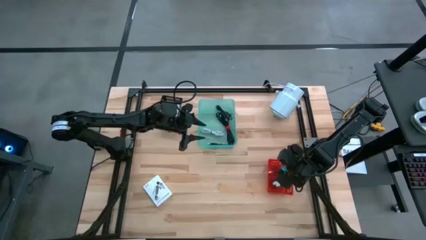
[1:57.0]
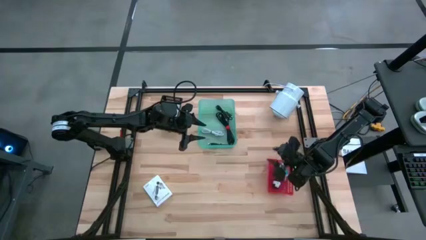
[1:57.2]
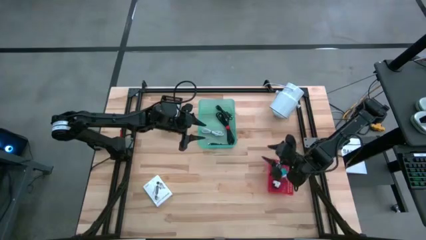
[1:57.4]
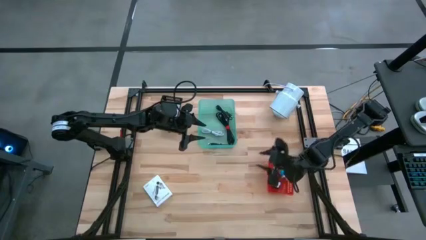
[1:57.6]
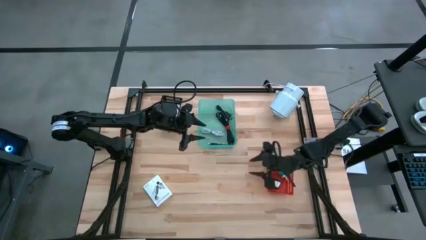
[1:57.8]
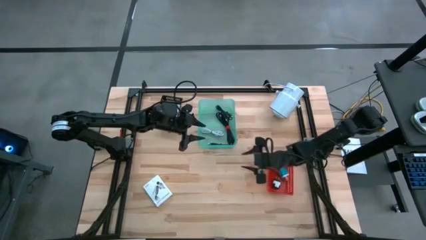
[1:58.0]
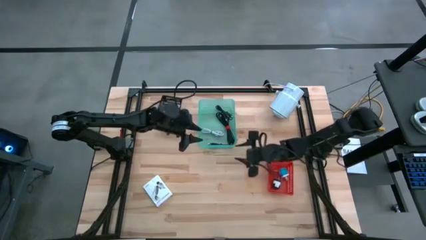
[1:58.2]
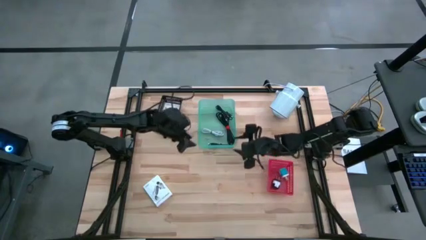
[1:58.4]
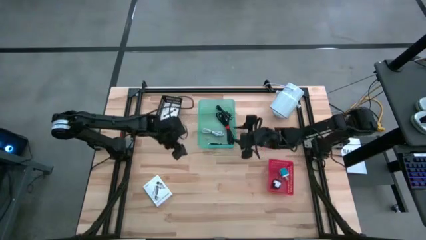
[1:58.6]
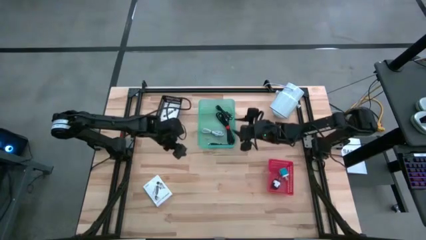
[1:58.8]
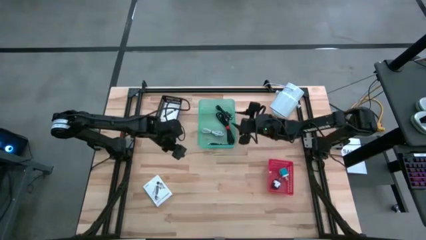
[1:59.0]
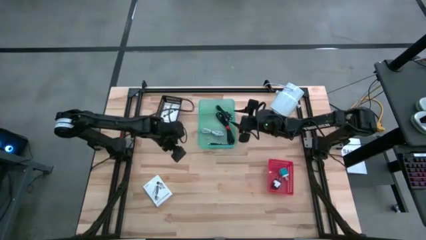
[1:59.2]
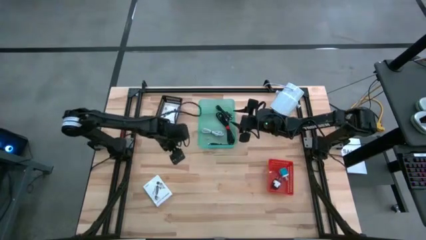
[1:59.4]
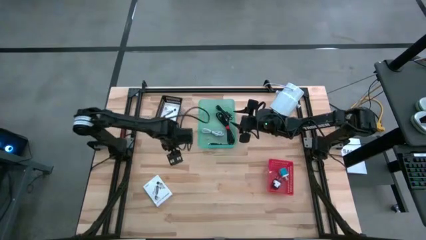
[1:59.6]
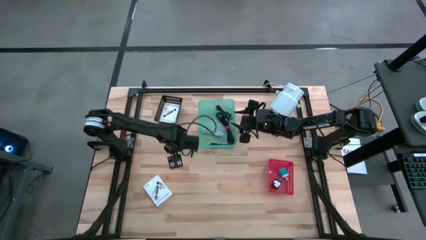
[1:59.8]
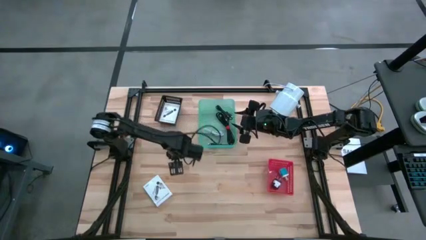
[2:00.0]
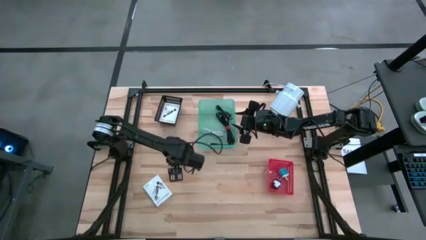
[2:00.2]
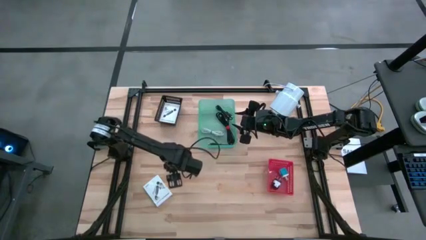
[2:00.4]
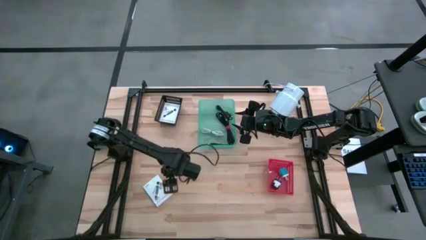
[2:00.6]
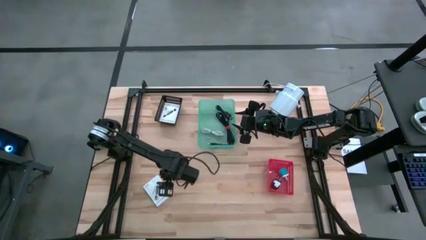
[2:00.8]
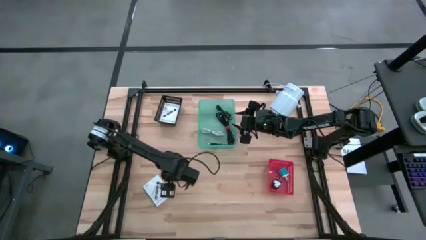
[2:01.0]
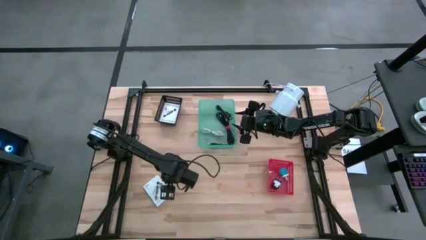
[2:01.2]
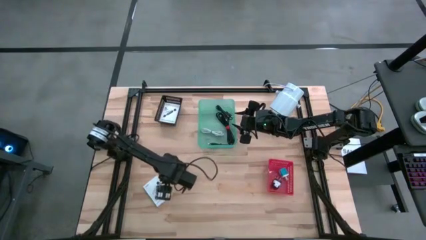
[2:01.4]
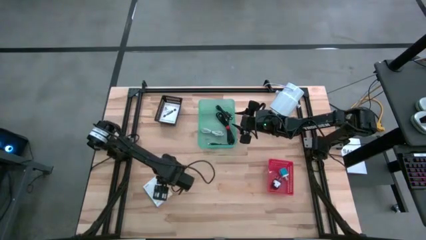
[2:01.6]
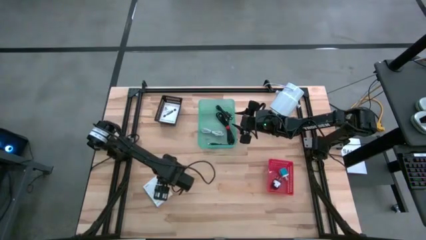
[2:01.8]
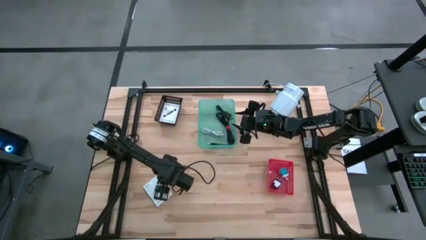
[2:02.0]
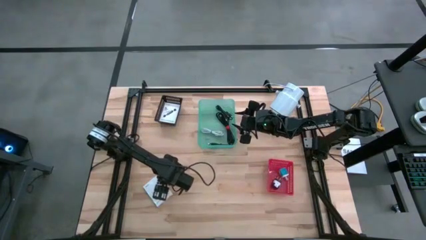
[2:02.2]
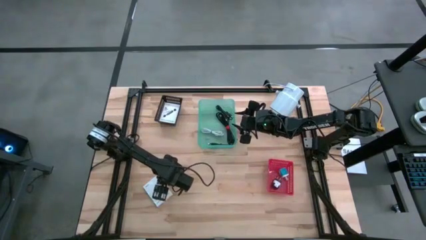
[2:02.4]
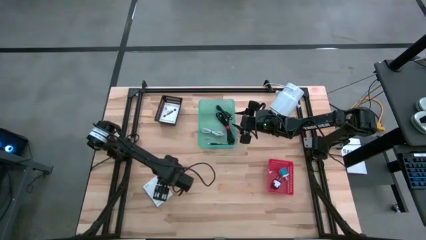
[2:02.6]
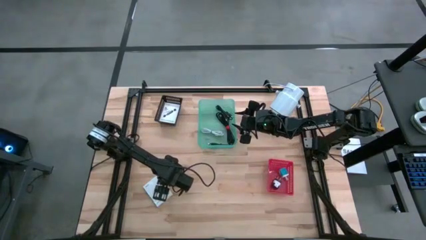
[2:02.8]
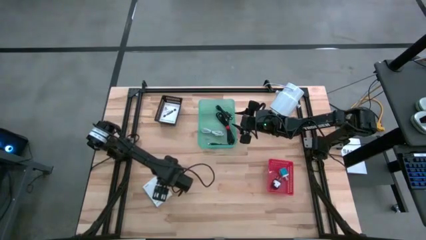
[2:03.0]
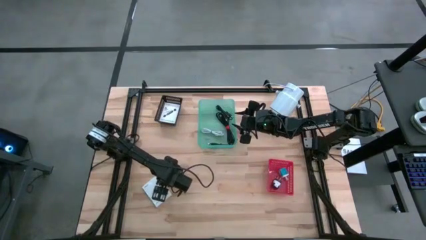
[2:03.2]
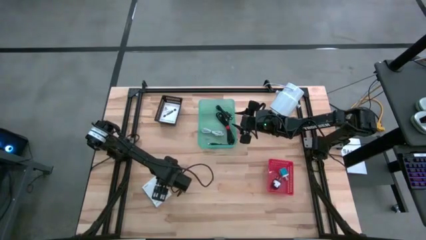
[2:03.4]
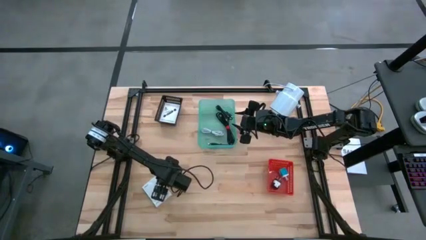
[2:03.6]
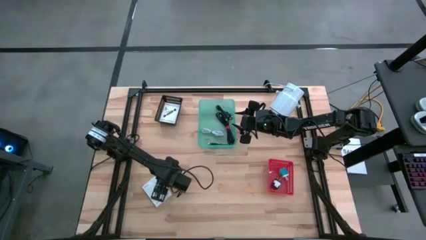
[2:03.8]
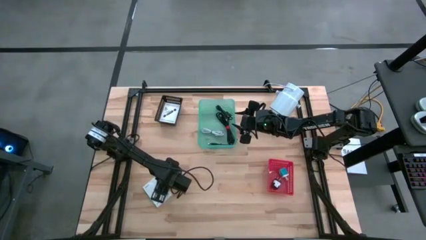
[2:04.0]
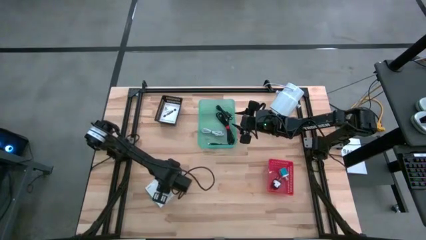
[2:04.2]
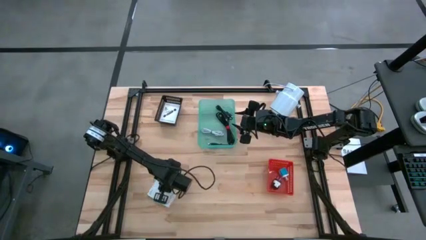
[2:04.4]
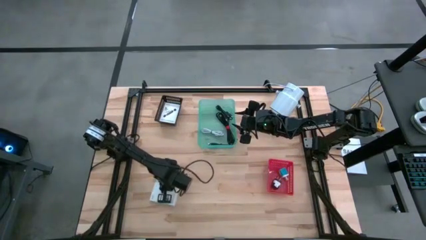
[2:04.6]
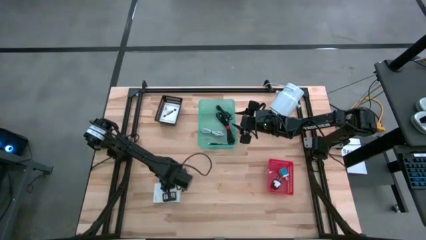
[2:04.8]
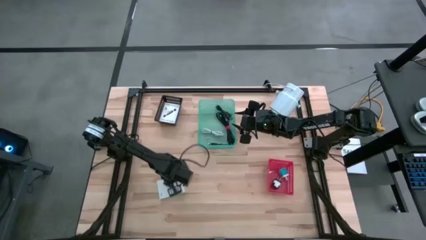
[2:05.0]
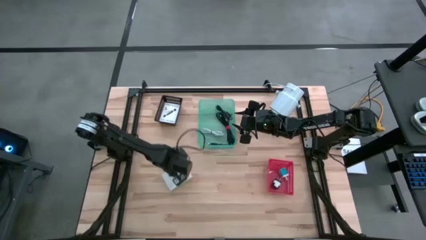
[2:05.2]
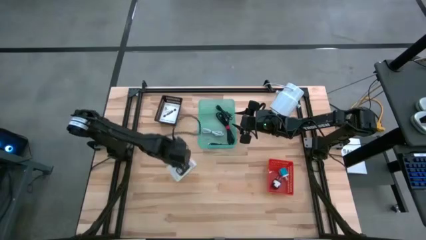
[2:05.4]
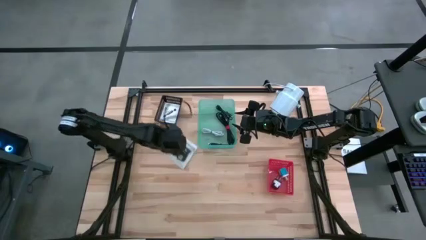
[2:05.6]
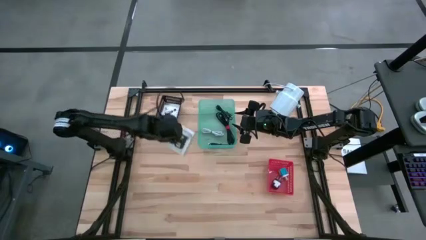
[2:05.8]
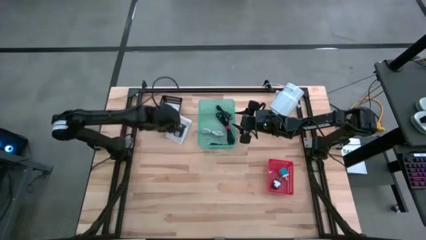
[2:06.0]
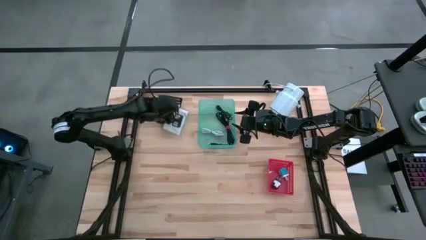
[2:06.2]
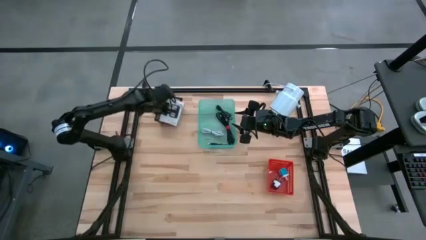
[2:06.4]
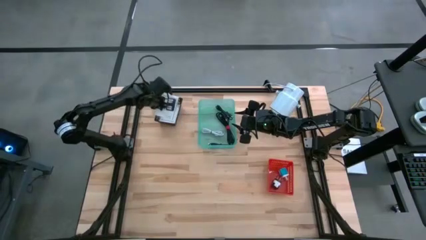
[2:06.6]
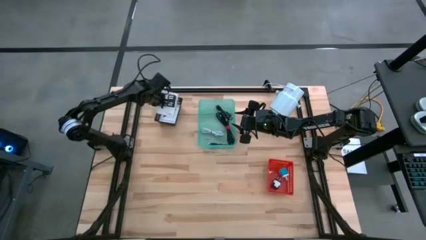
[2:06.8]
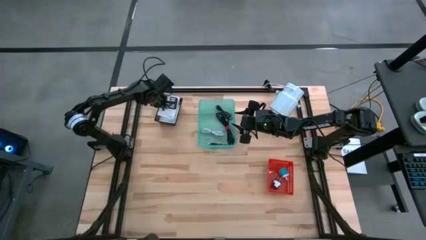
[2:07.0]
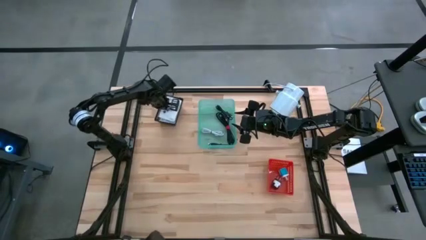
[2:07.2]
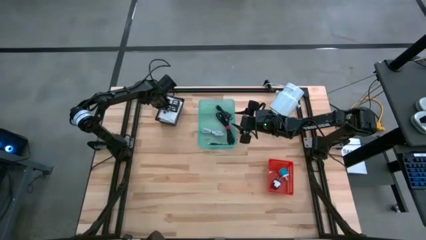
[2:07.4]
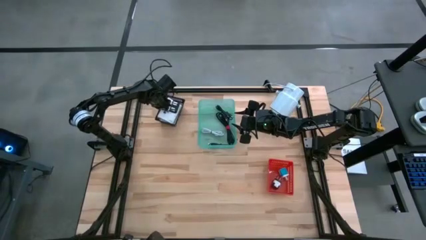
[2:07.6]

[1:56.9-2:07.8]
Task: Pick and place items into bin
Put the white card reader box into the black bin

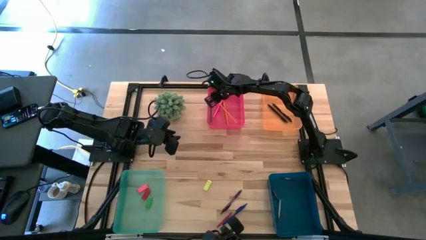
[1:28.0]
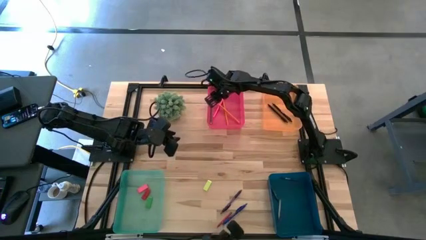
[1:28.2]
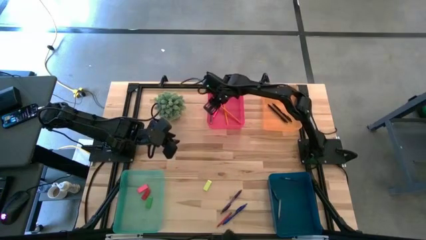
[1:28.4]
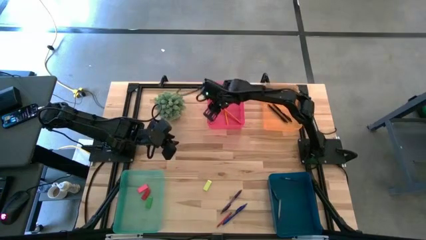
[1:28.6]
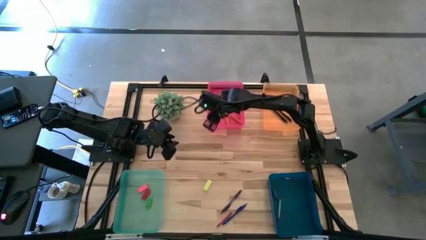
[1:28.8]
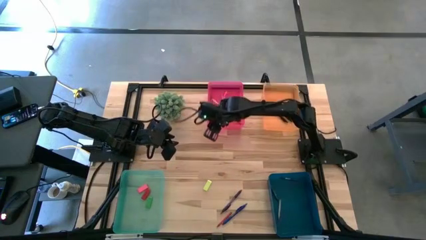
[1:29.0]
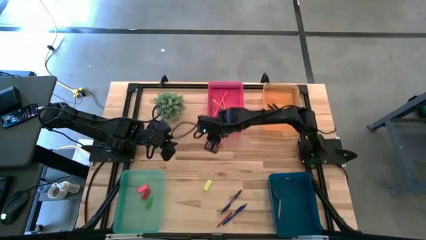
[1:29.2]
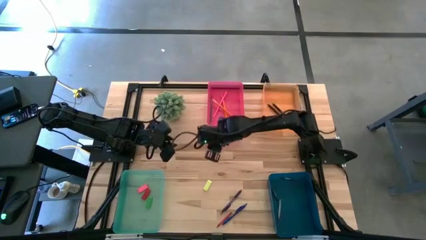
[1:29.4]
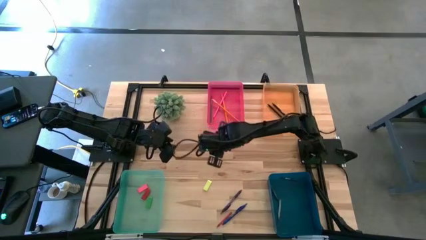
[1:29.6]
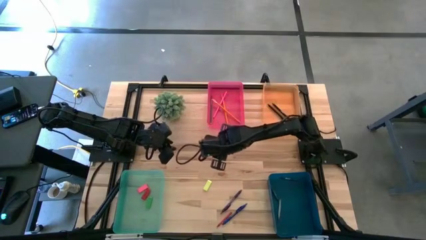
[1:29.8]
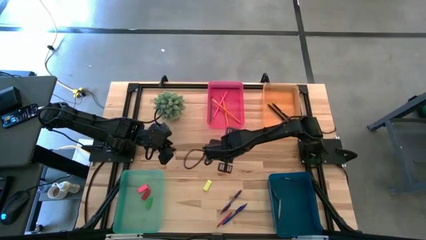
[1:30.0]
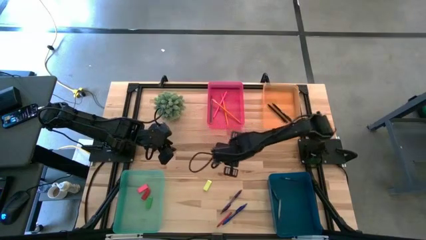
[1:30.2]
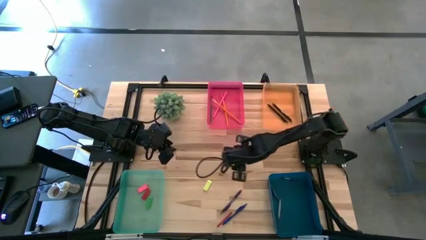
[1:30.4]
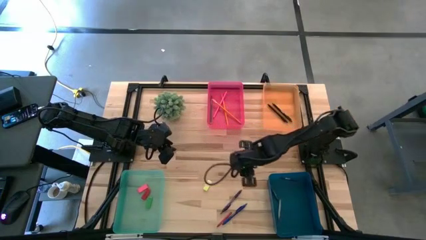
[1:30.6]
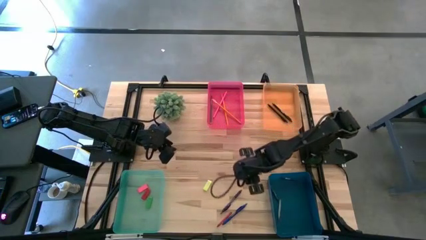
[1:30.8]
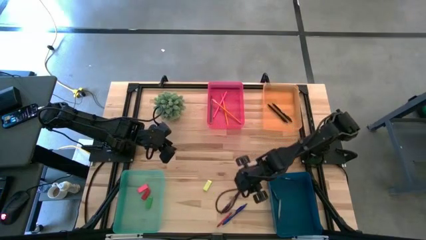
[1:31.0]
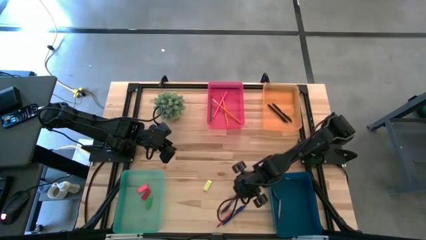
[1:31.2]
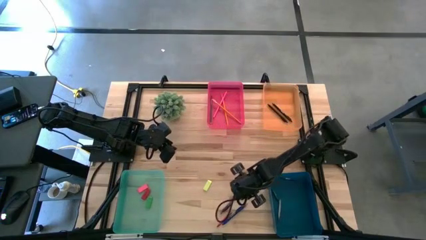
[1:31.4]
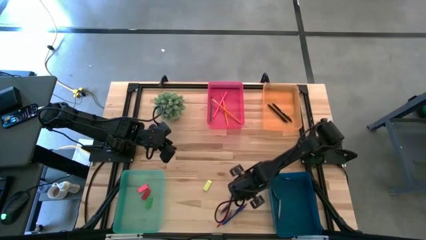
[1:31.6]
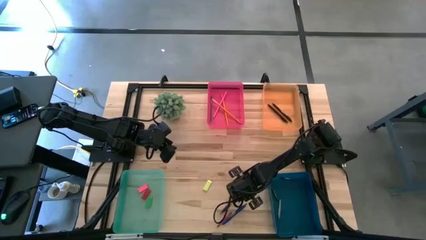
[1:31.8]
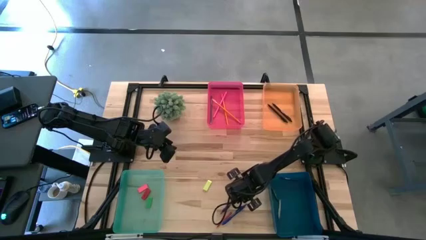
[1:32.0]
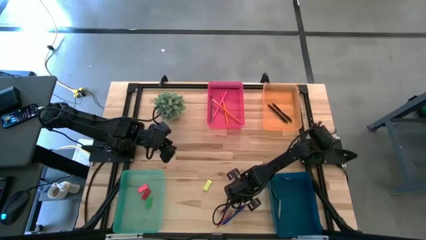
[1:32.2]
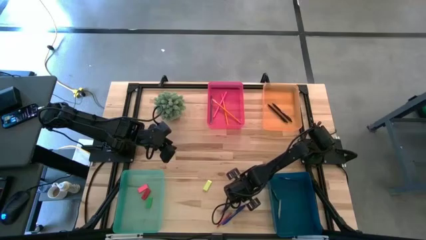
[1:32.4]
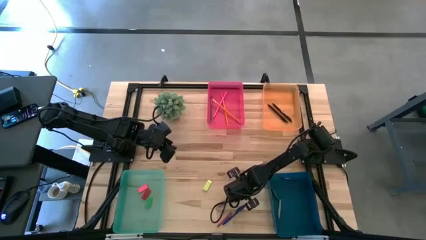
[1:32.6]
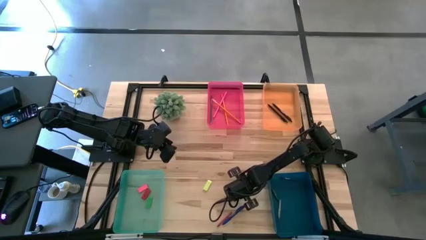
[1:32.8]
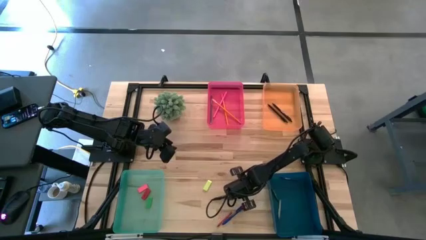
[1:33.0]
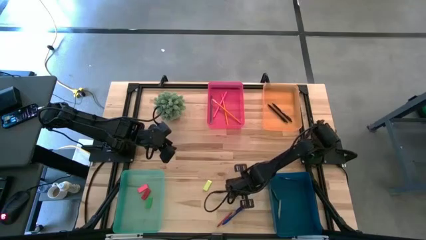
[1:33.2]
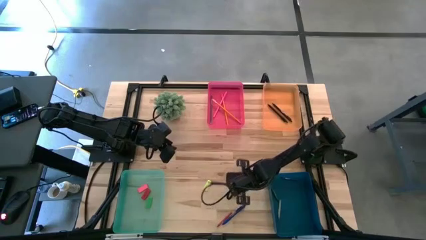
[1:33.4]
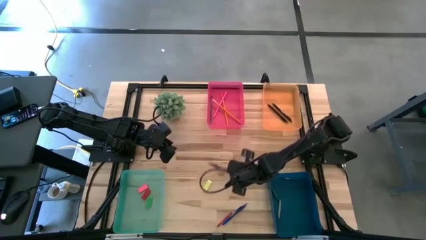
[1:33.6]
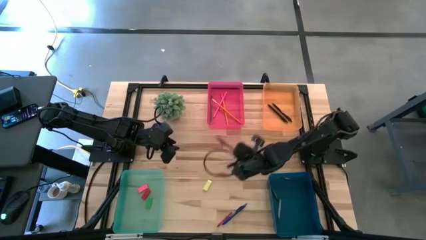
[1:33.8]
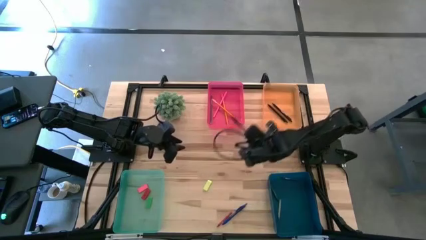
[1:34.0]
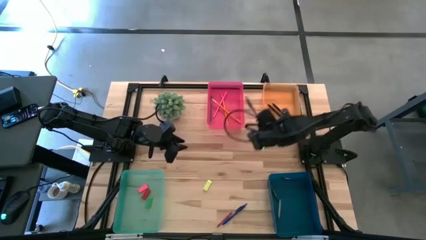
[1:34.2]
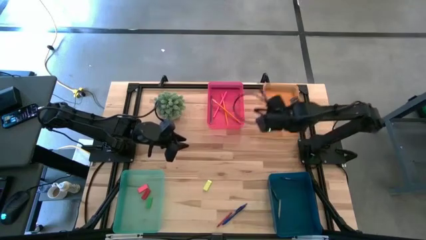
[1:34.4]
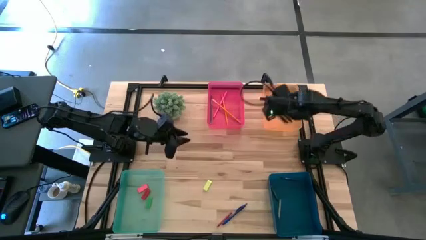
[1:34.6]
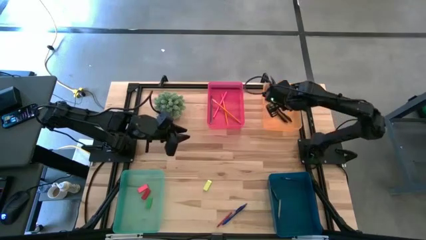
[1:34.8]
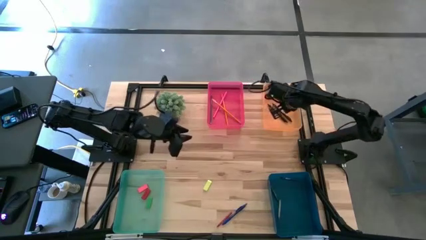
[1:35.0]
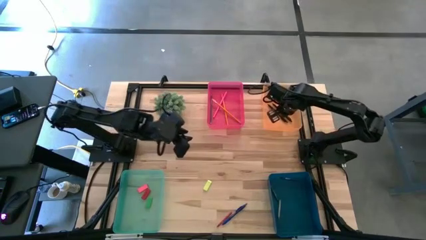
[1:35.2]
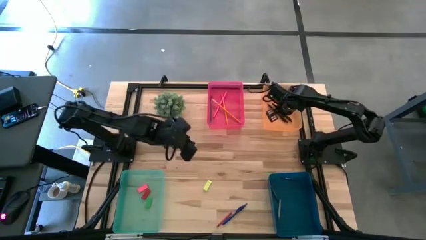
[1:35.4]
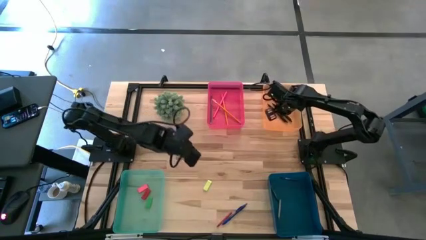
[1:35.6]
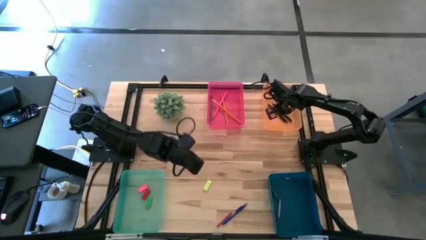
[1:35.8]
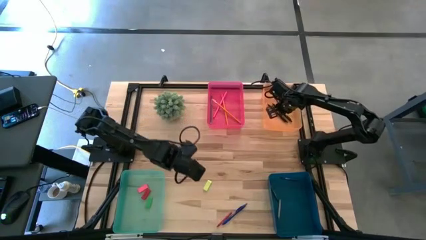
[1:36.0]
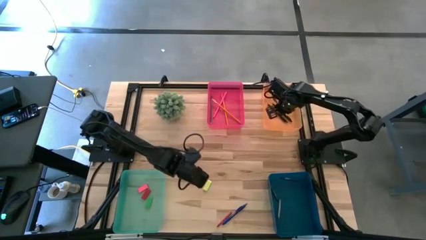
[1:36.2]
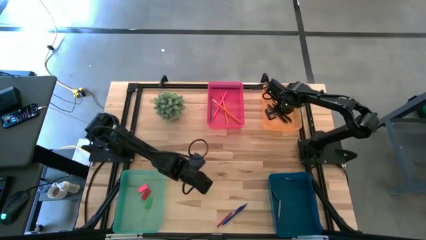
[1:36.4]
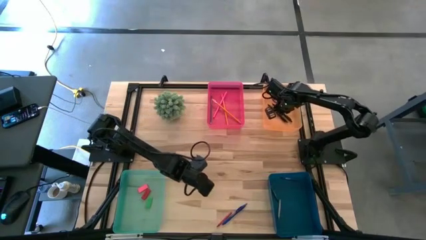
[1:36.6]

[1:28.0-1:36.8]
Task: Sort crayons/erasers/pens/pencils in bins
Put the purple pen into the orange bin
